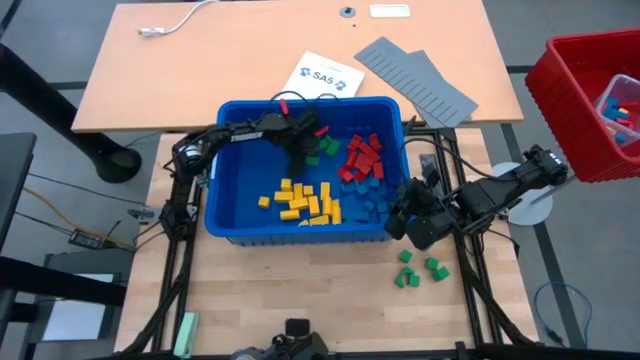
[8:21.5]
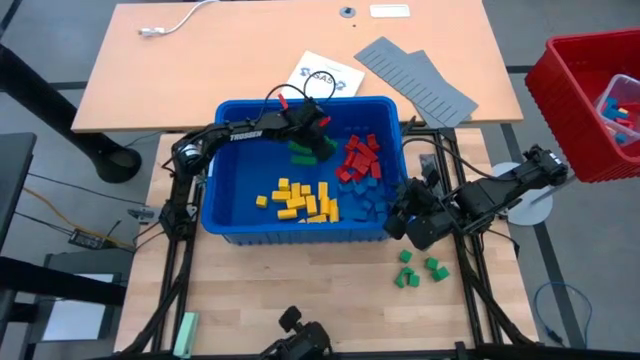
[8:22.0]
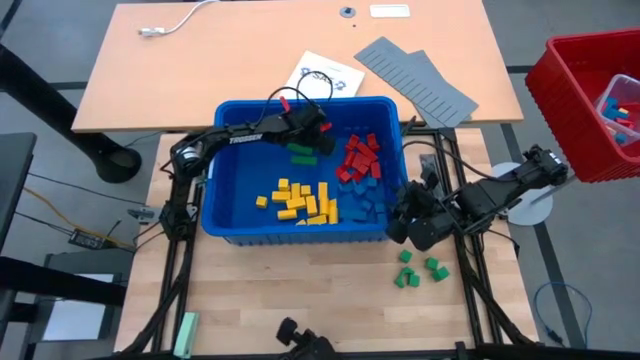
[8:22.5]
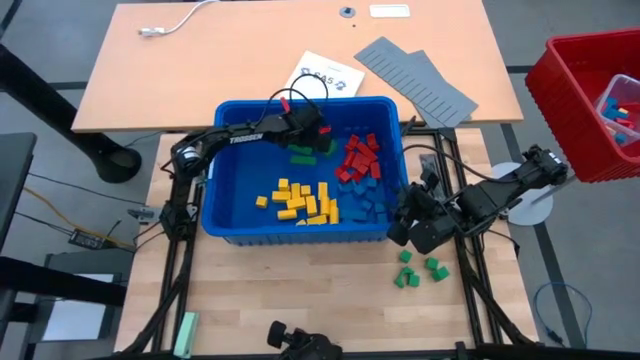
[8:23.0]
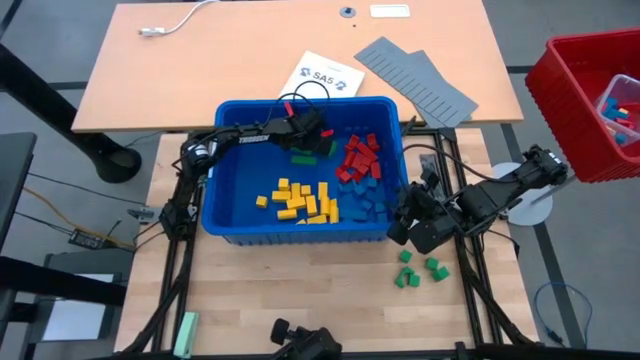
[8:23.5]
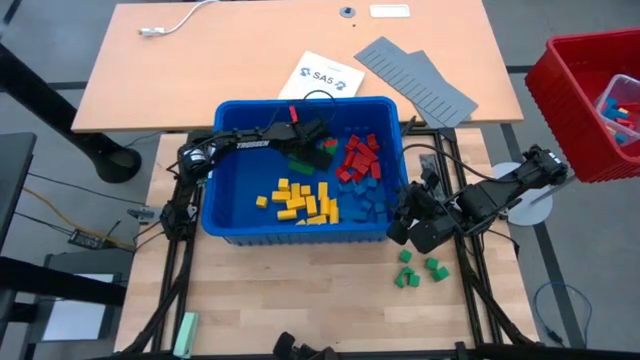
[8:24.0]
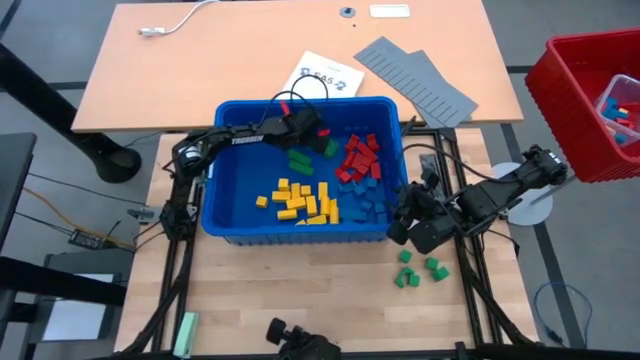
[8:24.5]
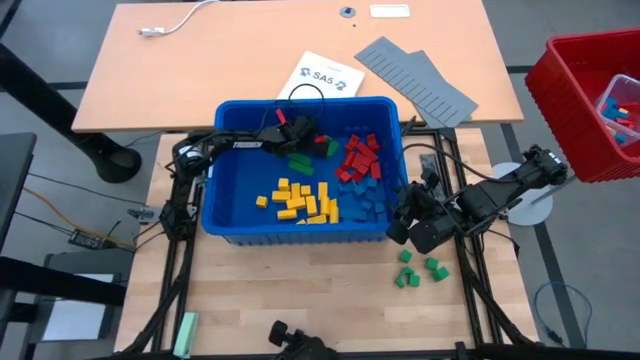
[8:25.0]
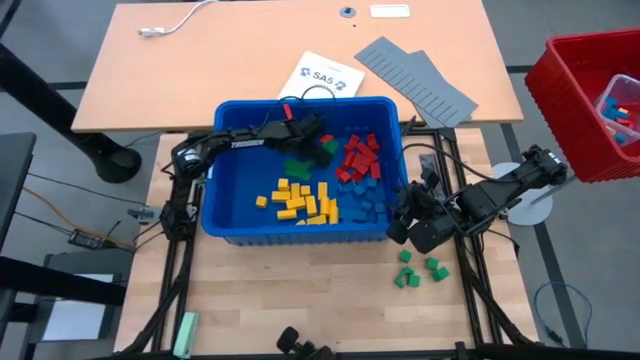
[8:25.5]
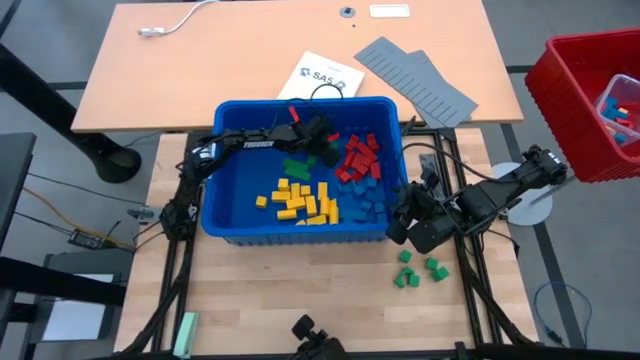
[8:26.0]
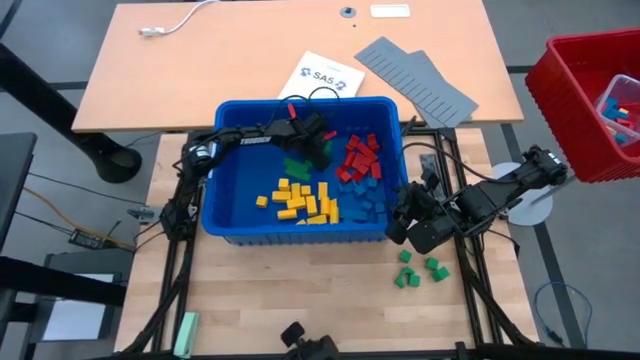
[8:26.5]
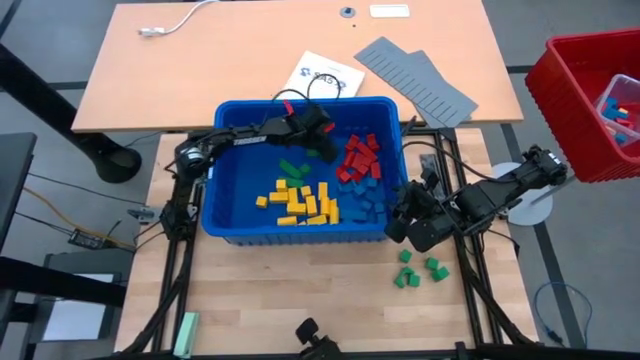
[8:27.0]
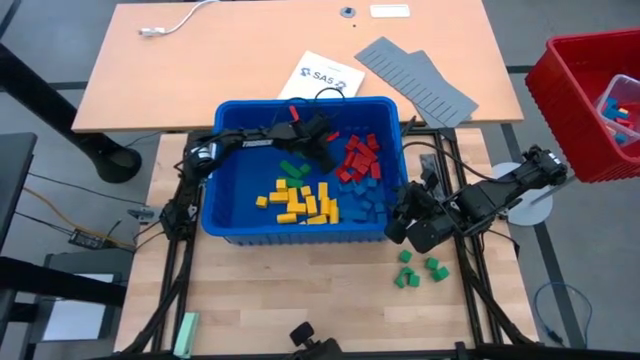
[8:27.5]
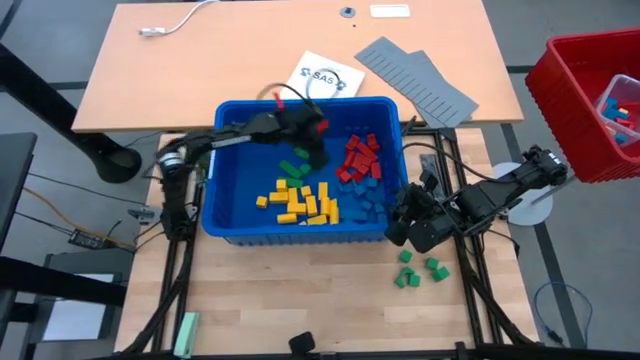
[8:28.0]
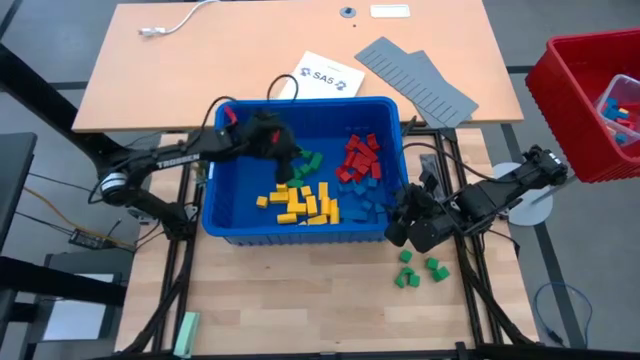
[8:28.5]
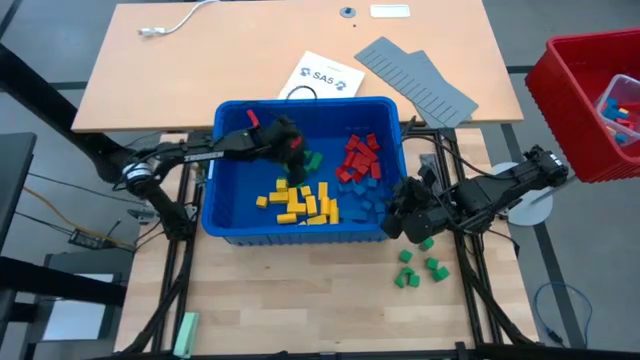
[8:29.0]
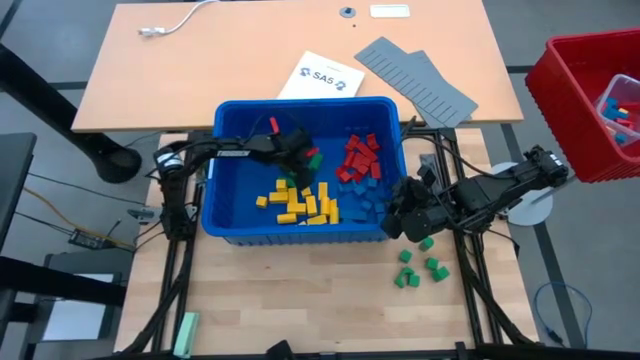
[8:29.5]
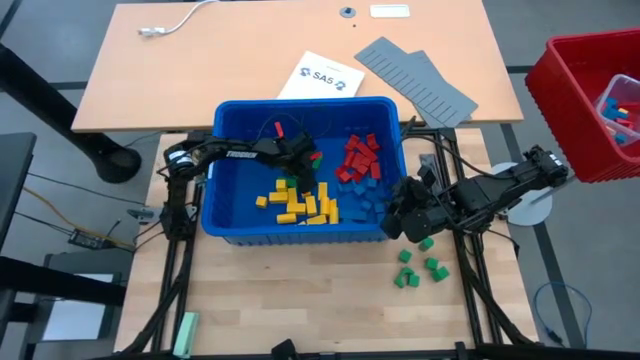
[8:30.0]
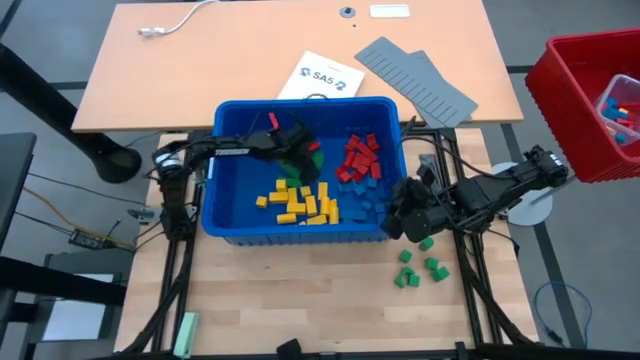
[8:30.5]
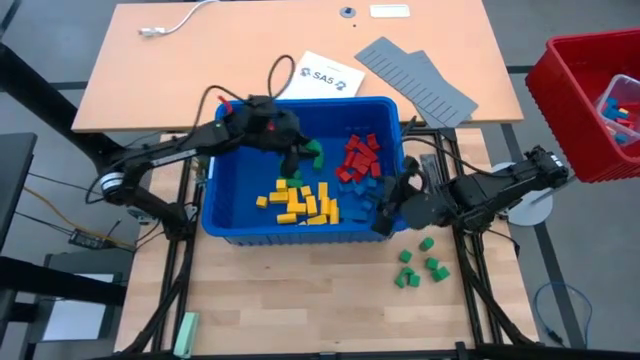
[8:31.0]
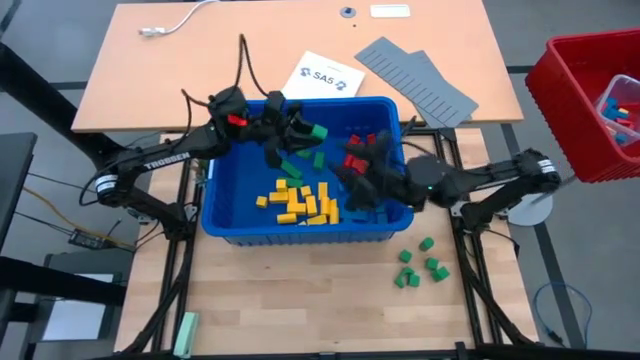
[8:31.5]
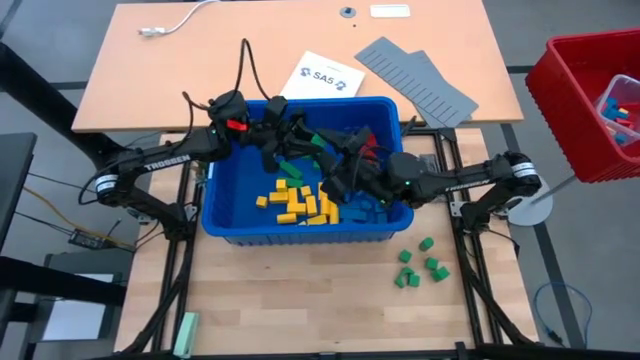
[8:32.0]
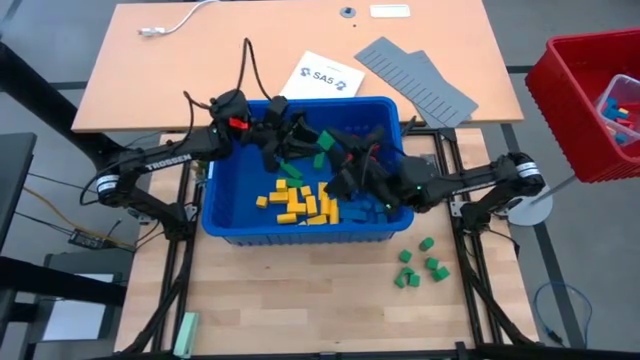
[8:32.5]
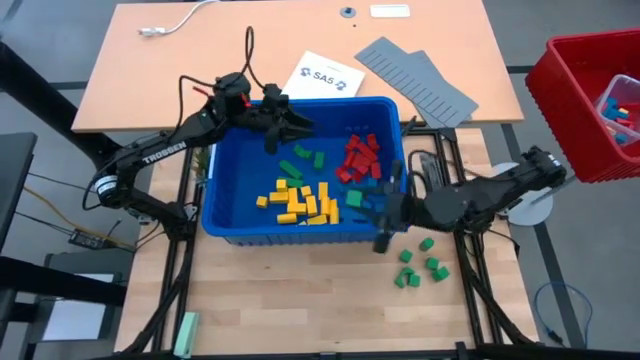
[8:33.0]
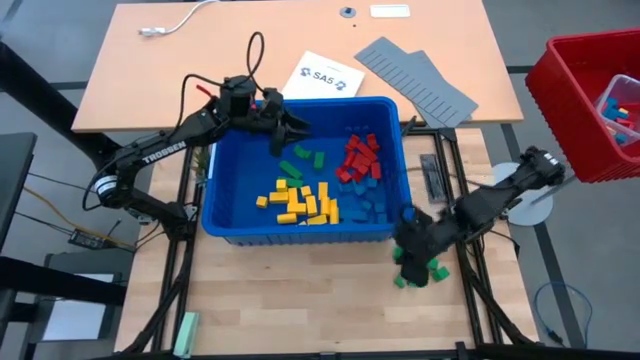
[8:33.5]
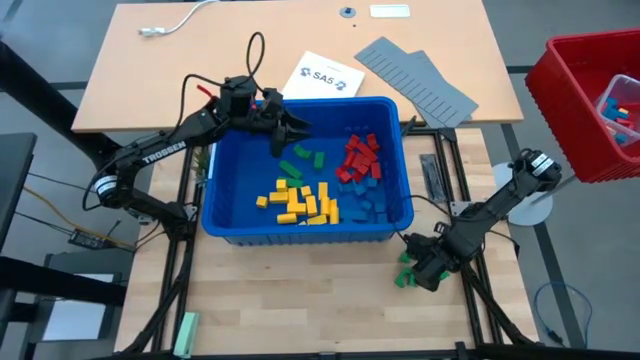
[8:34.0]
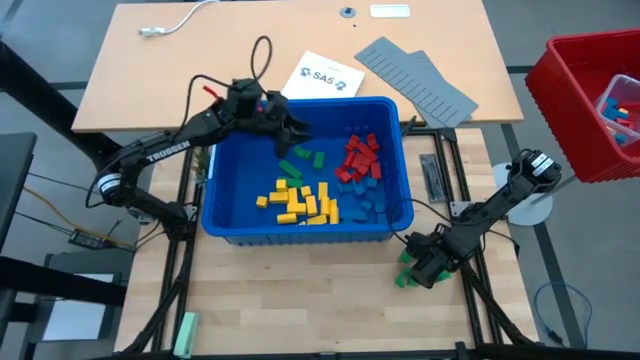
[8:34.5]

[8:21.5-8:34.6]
Task: Sort blocks
Remove the green block from the blue bin

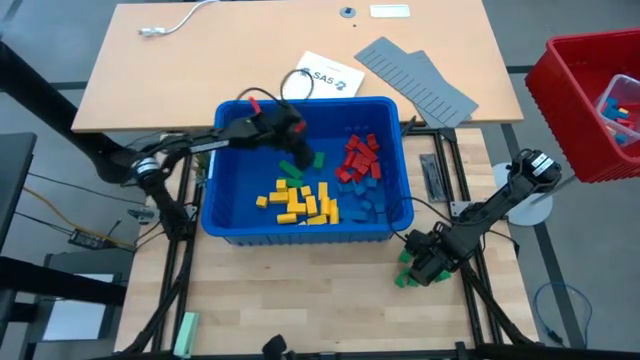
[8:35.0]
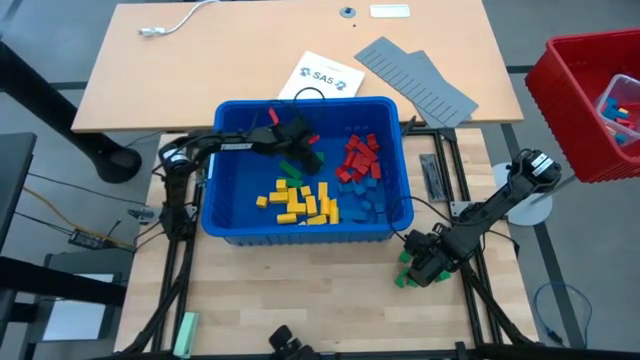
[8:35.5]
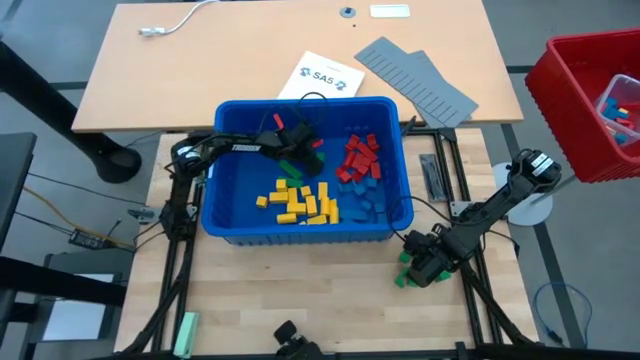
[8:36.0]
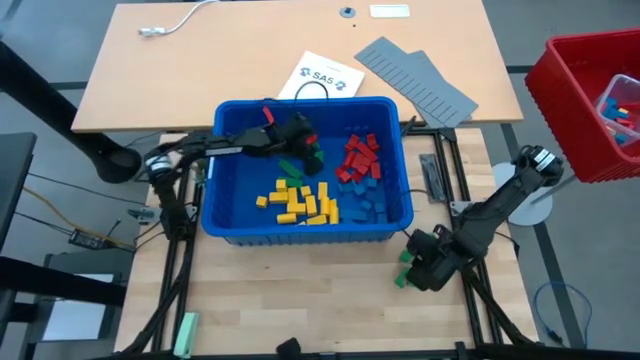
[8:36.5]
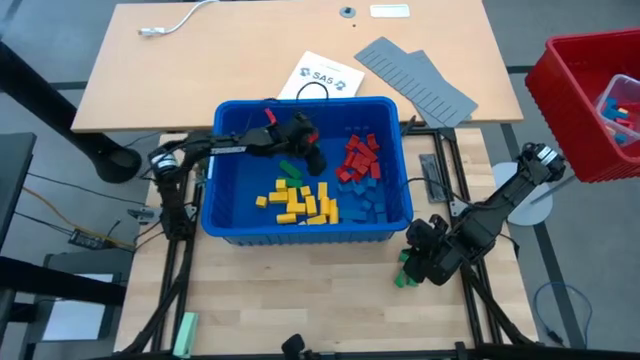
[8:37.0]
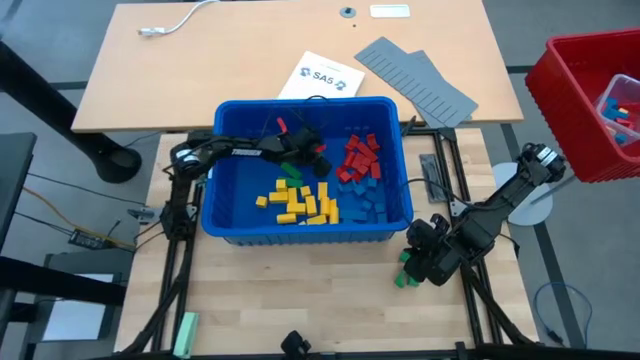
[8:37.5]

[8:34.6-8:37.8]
Remove the green block from the blue bin
